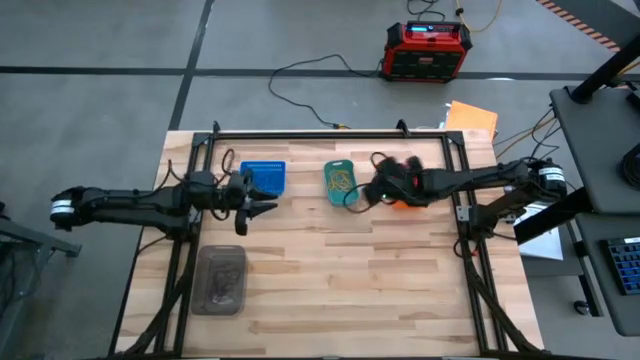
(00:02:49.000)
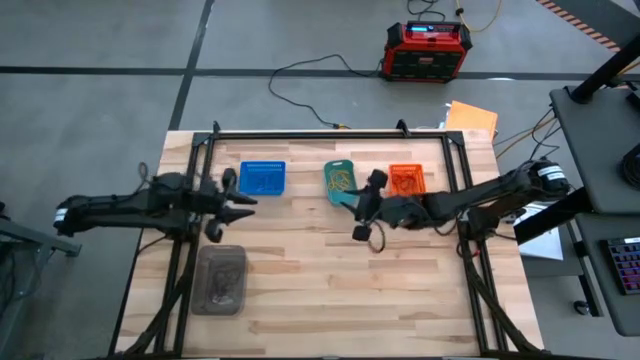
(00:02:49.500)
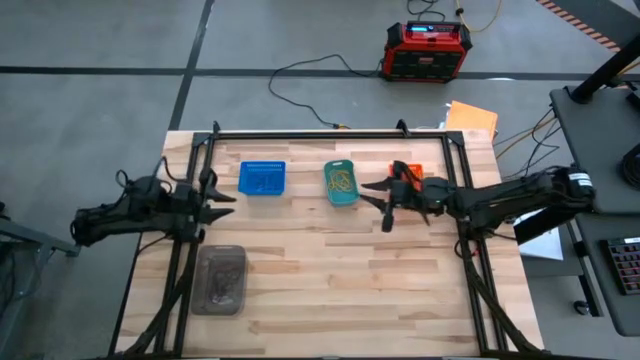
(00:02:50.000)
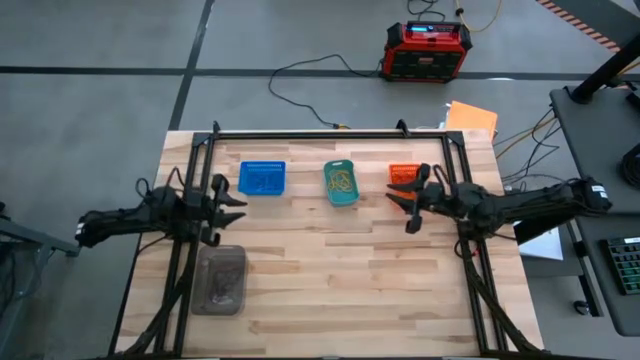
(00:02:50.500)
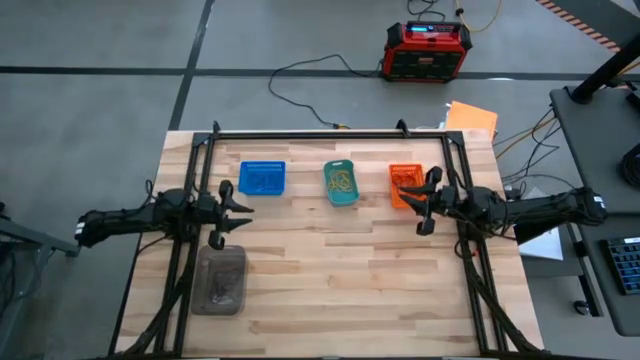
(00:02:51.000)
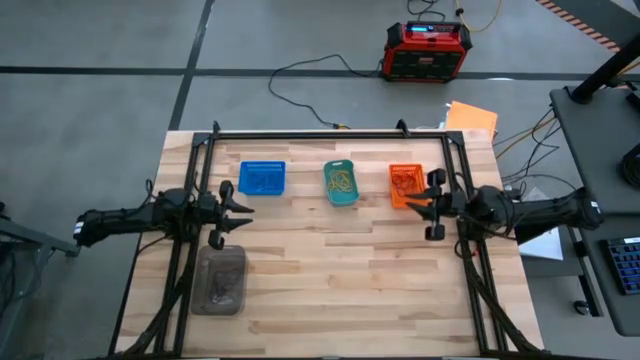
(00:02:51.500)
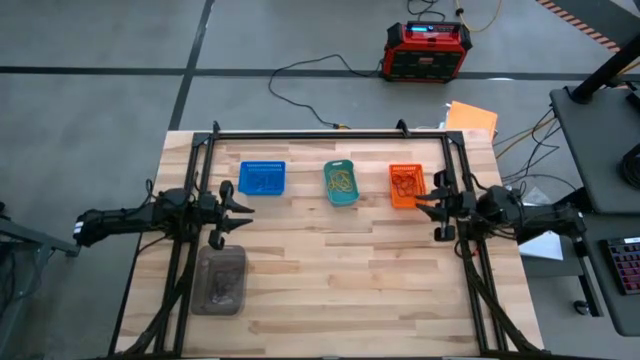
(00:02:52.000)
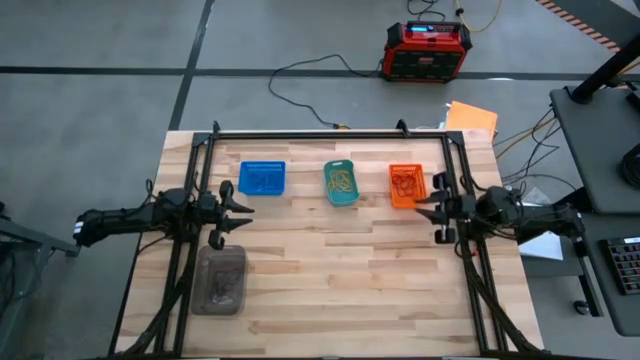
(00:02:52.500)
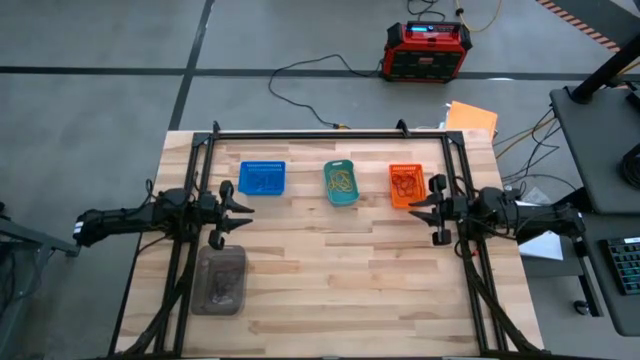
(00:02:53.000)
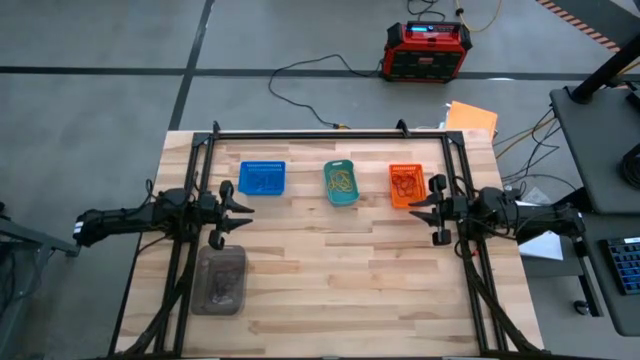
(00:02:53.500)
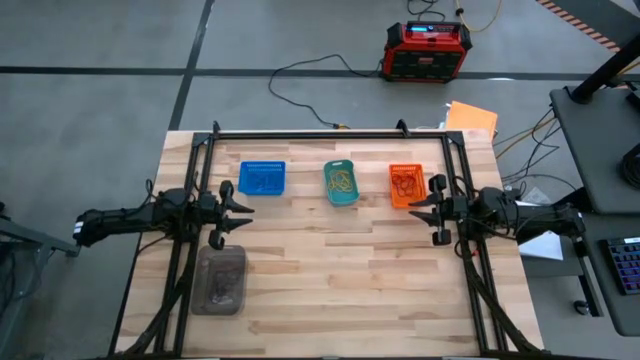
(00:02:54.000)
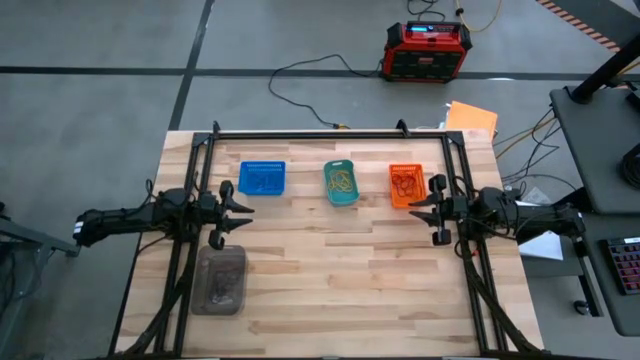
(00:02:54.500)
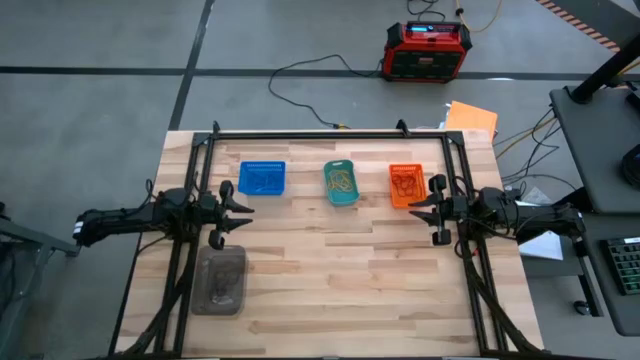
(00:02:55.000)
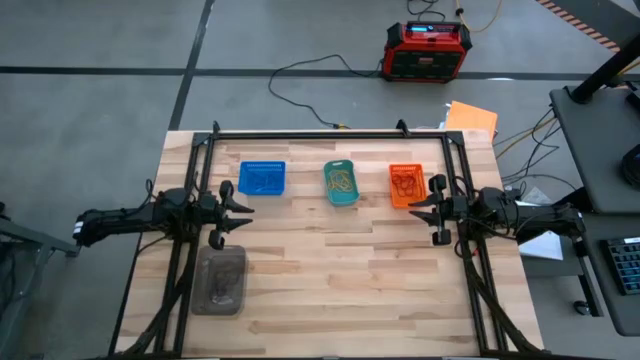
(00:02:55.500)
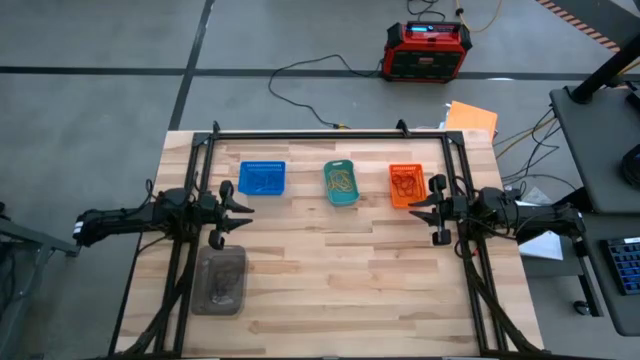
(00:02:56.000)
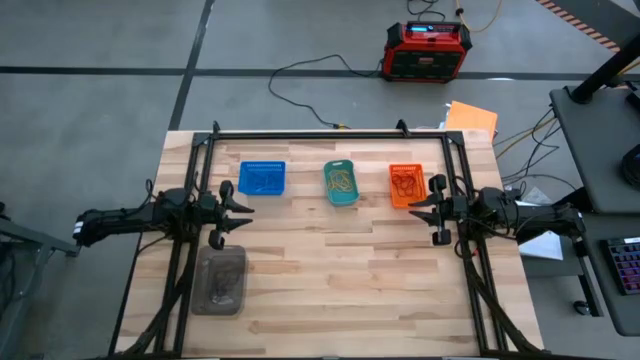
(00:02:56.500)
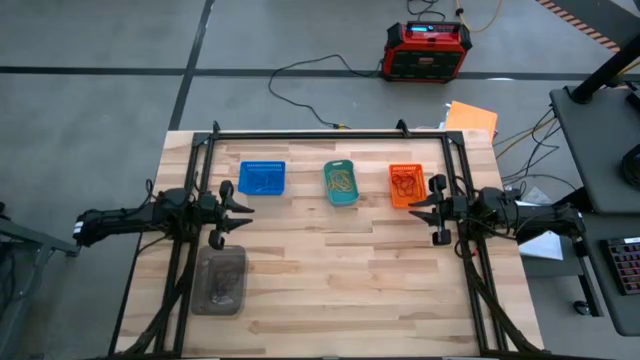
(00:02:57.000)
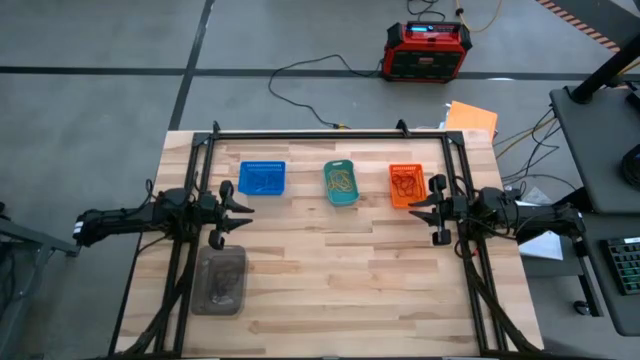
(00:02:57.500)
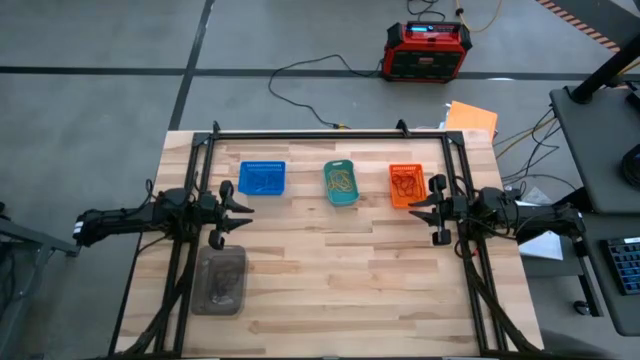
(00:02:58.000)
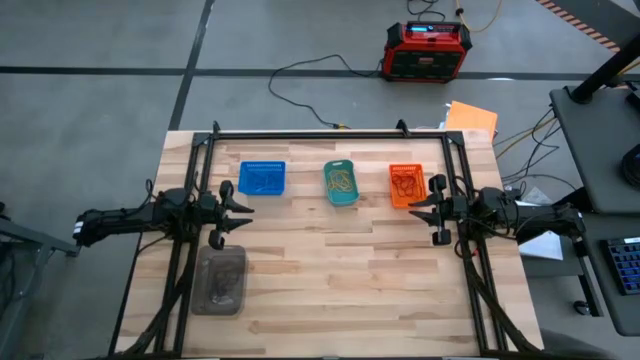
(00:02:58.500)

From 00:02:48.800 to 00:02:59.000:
Task: Sort rubber bands into baskets
Return to Home Position

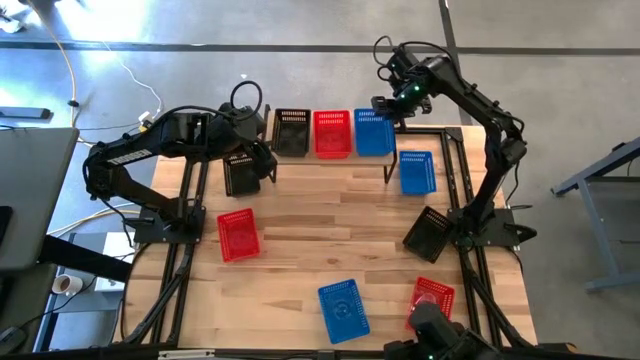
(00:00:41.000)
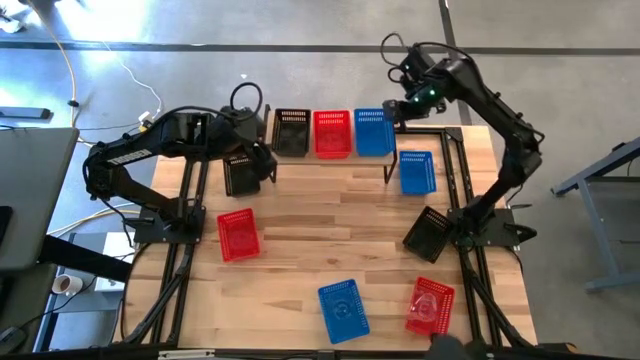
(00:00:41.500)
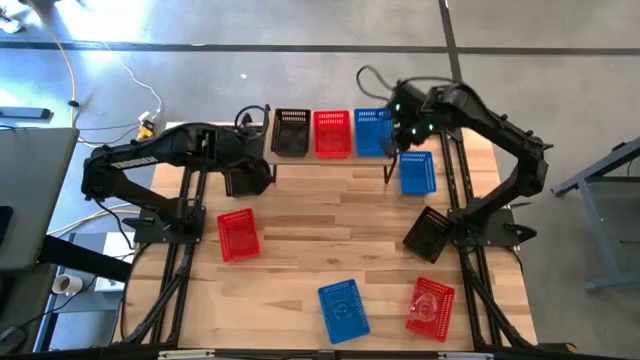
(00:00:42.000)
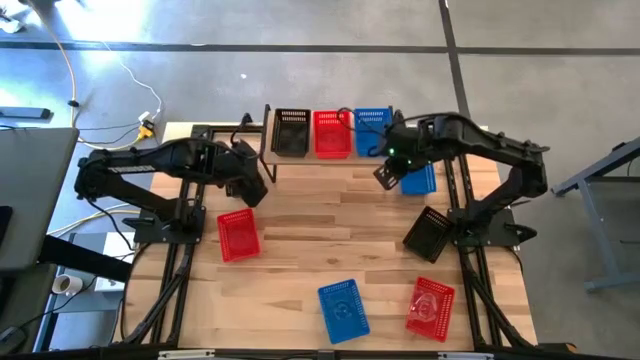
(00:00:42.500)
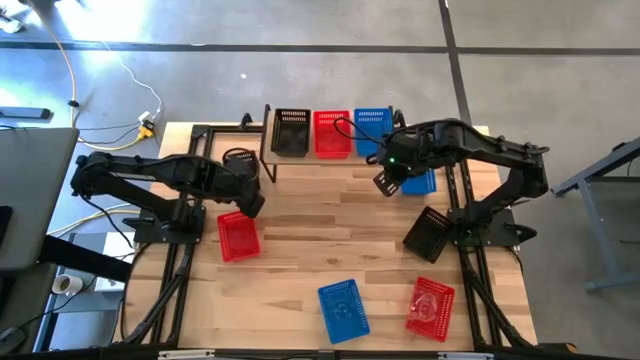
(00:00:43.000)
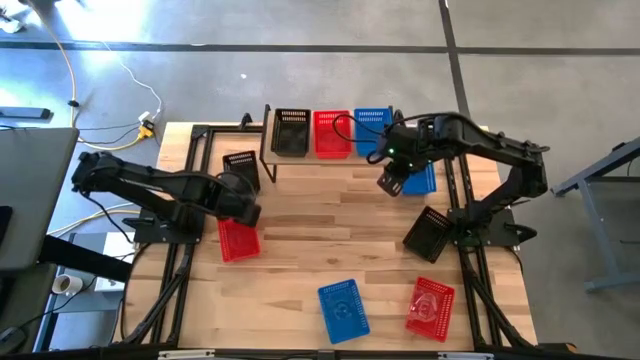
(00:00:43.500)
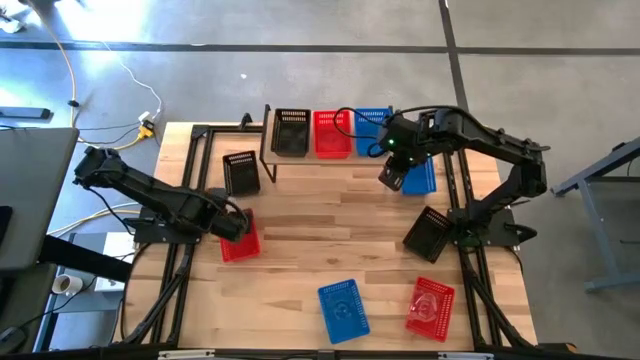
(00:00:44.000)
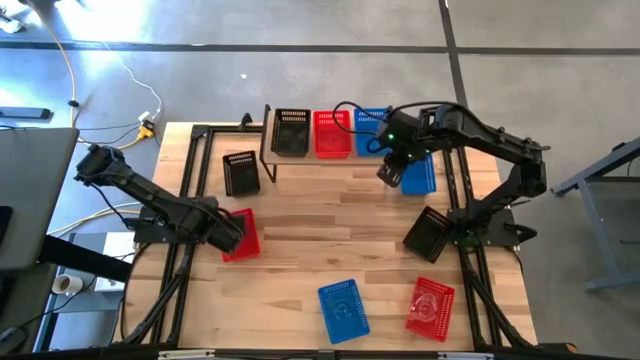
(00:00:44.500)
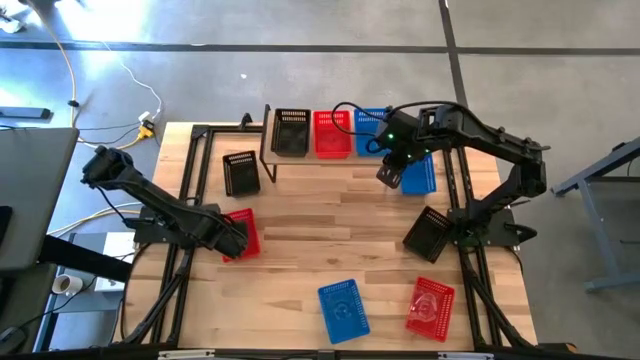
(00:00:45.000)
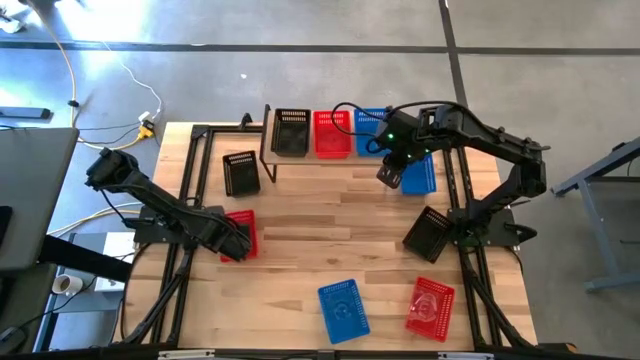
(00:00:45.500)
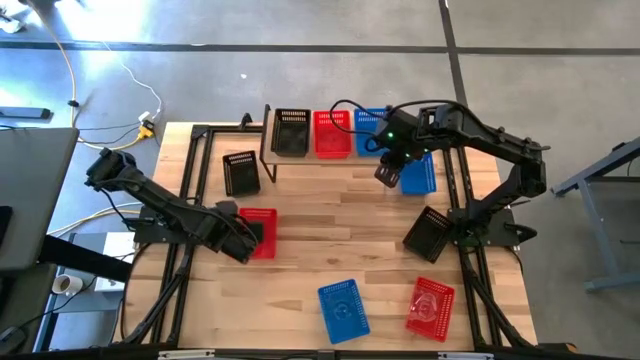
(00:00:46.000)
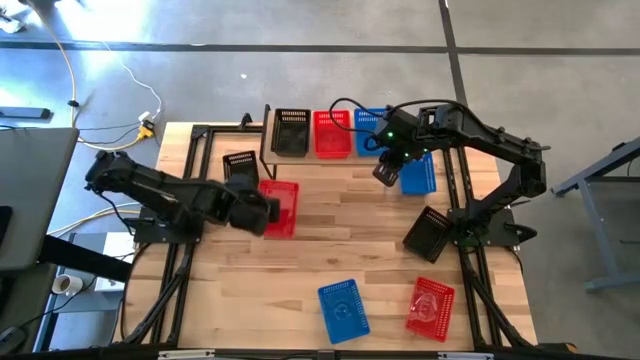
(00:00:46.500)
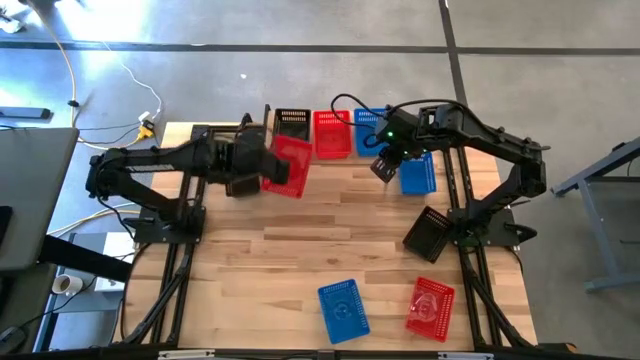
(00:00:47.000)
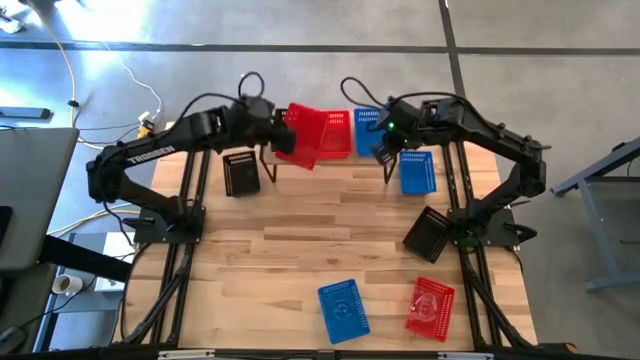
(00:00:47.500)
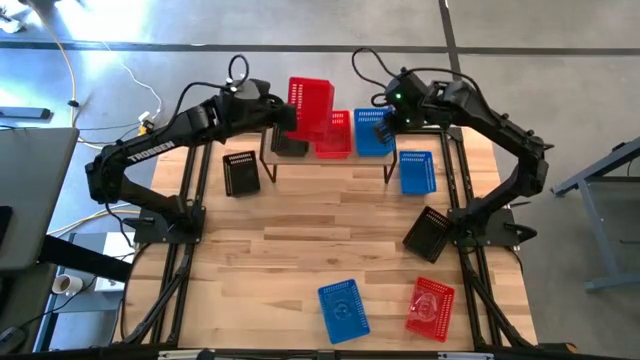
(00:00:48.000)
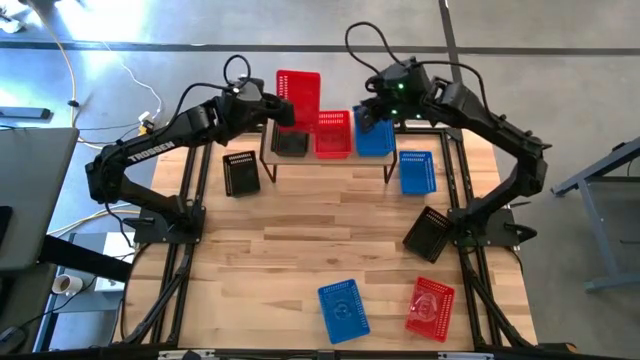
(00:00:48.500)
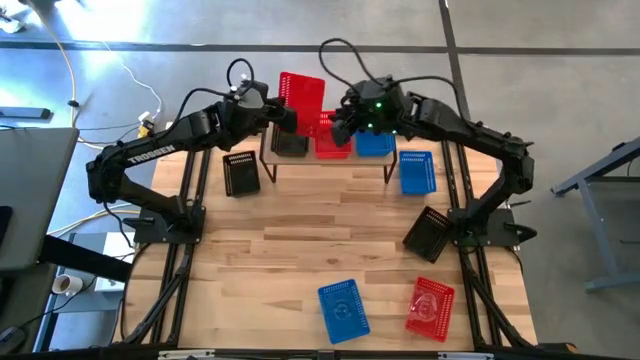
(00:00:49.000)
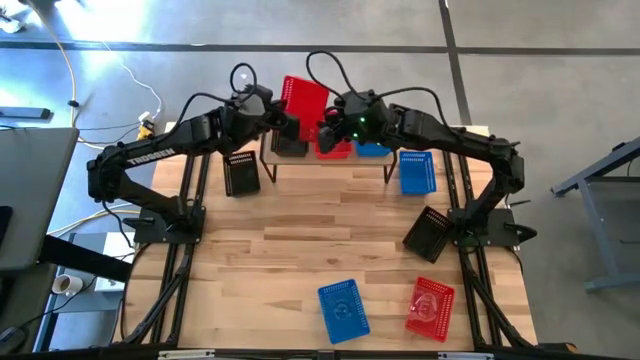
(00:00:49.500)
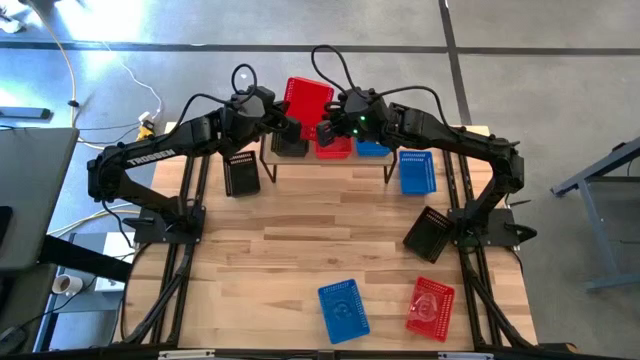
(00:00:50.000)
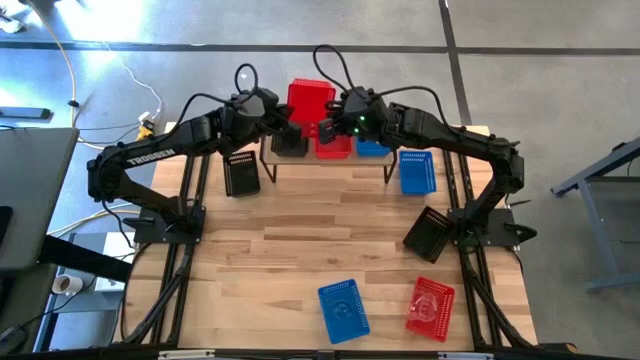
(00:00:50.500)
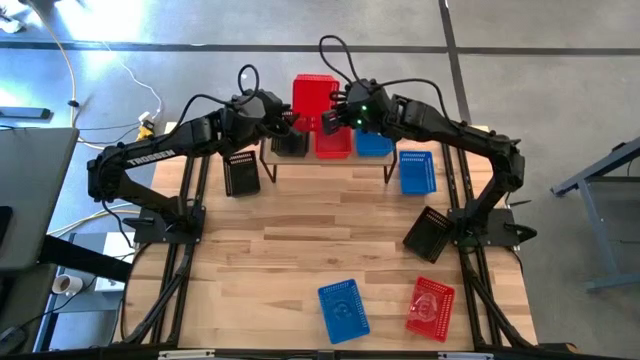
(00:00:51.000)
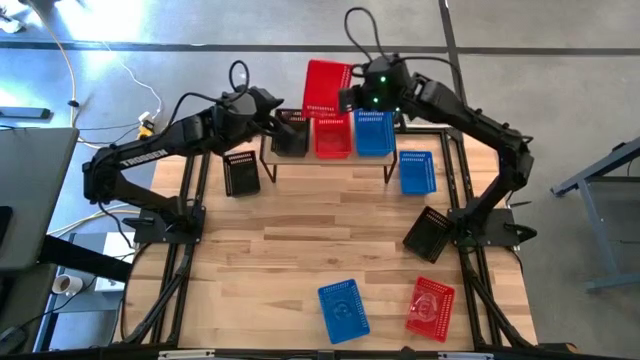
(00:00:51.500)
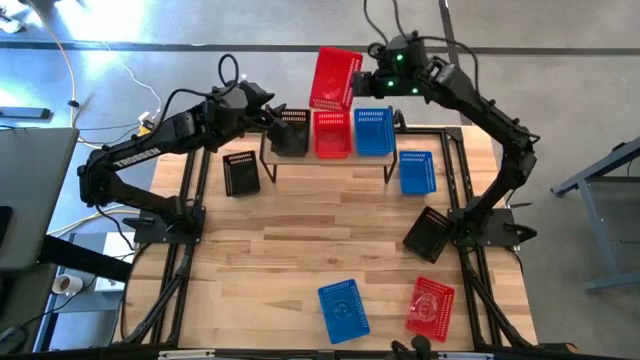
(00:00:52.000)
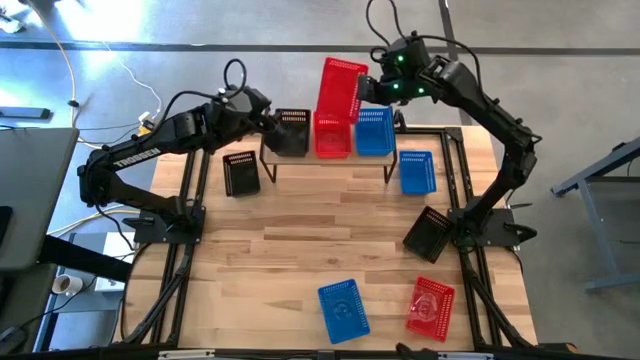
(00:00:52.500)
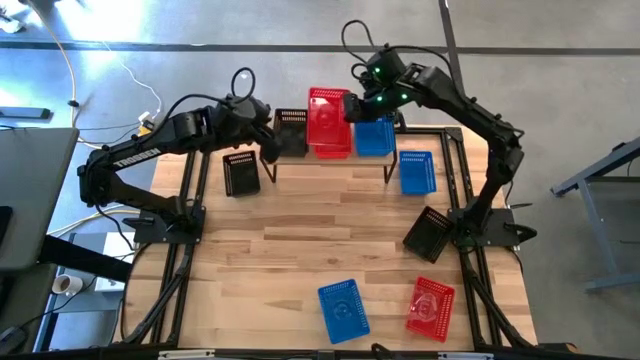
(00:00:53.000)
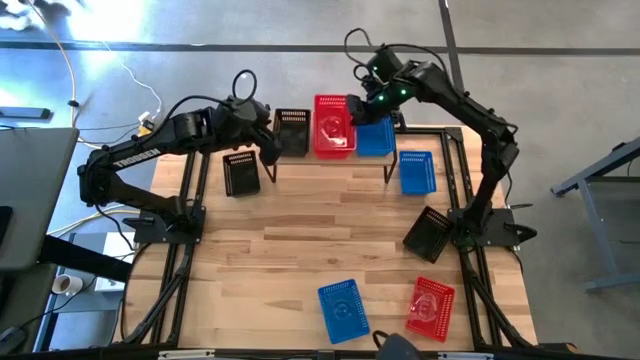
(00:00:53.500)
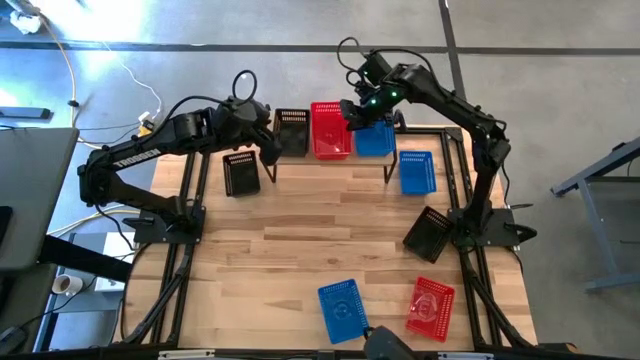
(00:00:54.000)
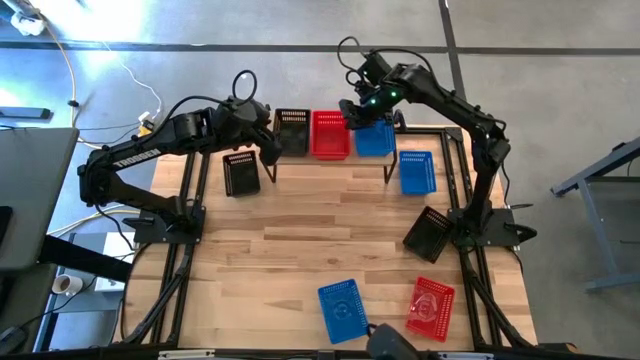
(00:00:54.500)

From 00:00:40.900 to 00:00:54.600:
Task: Stack baskets on shelf by color
Stack the top red bin on top of the red bin on the shelf
